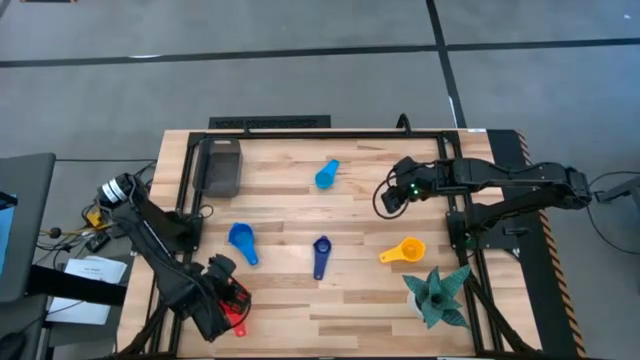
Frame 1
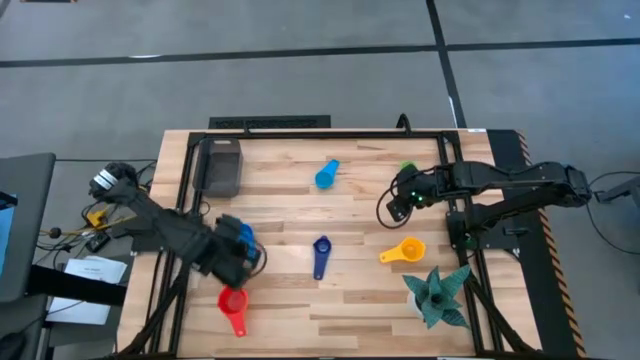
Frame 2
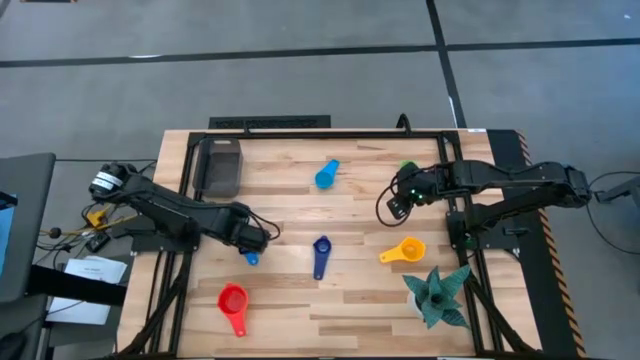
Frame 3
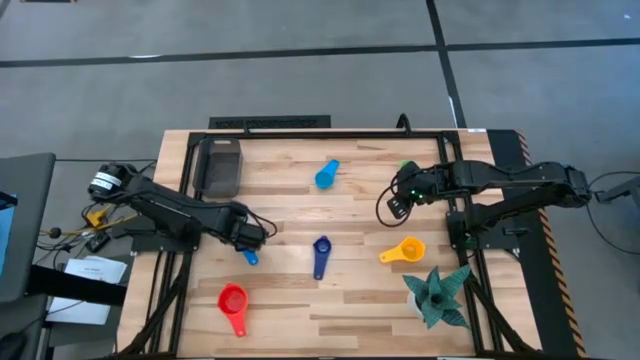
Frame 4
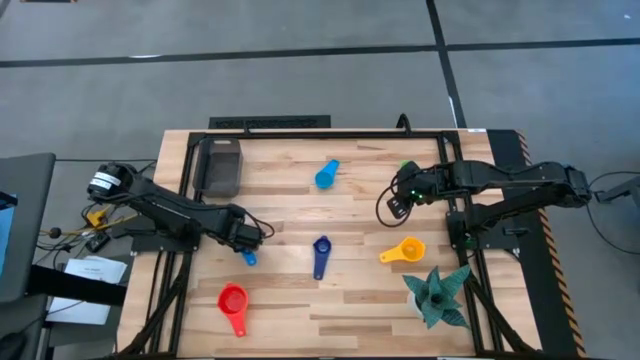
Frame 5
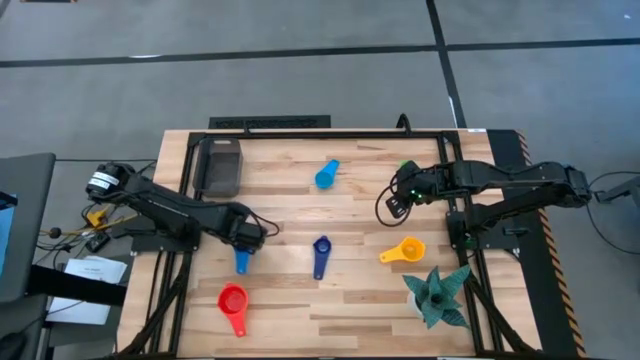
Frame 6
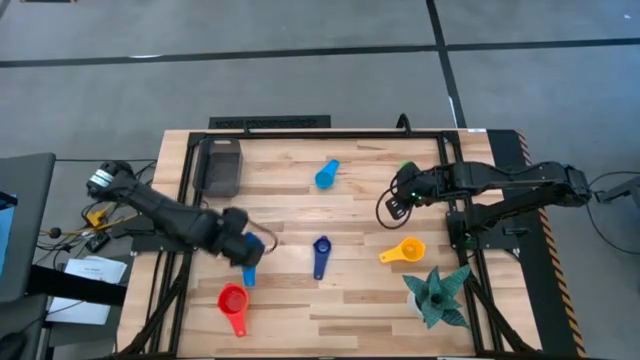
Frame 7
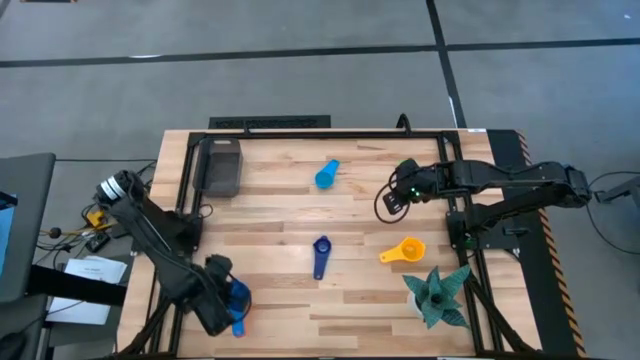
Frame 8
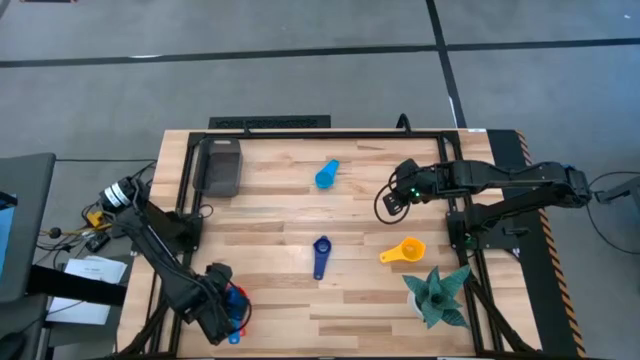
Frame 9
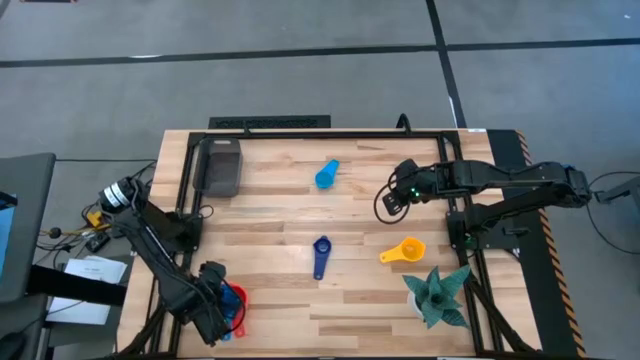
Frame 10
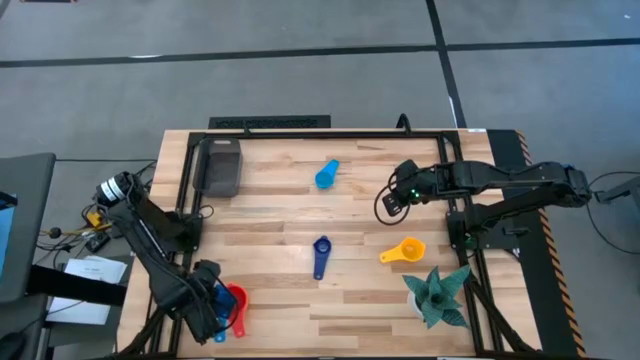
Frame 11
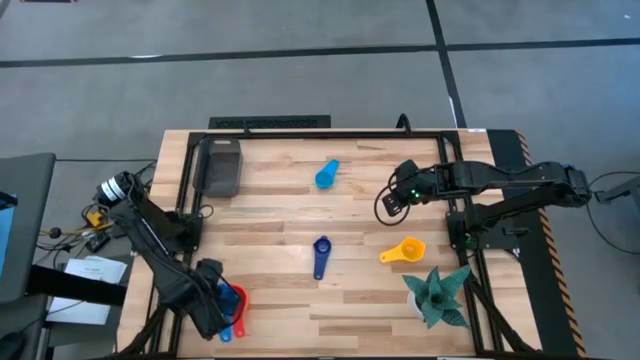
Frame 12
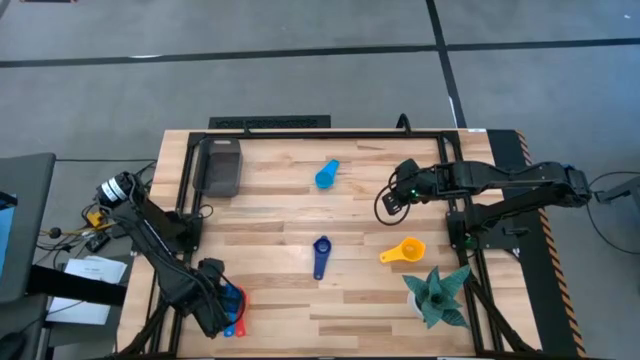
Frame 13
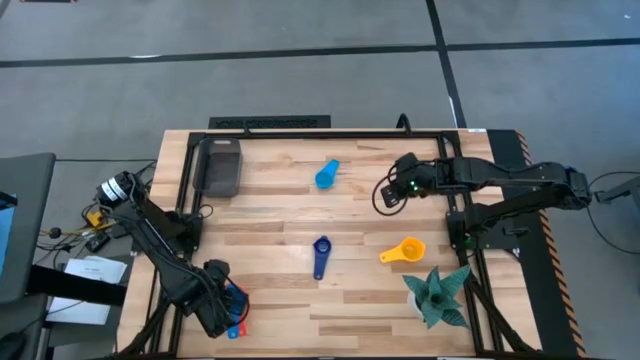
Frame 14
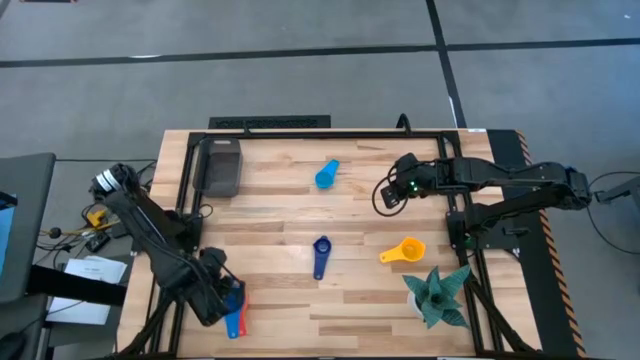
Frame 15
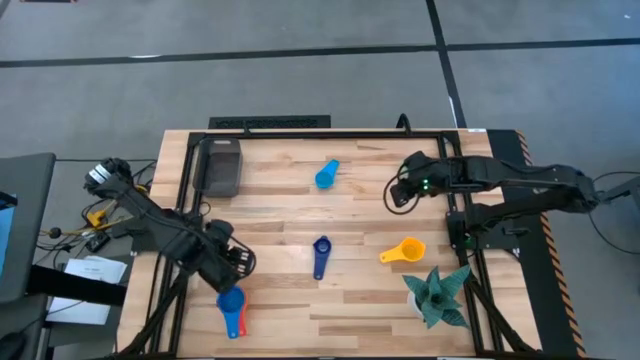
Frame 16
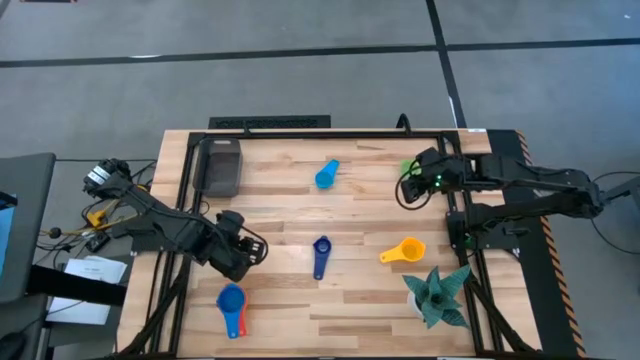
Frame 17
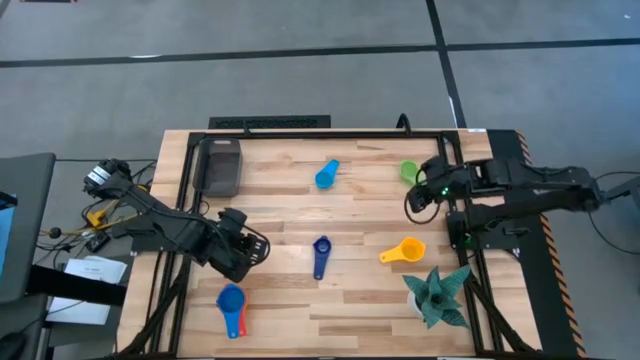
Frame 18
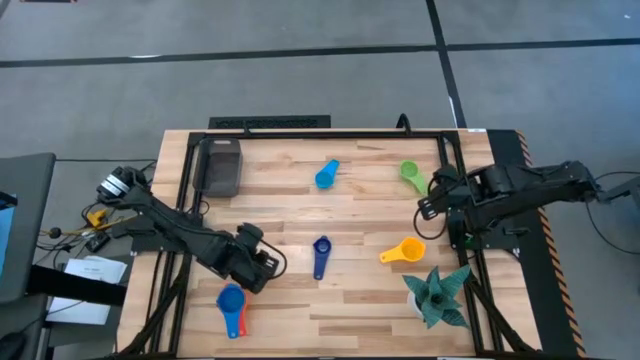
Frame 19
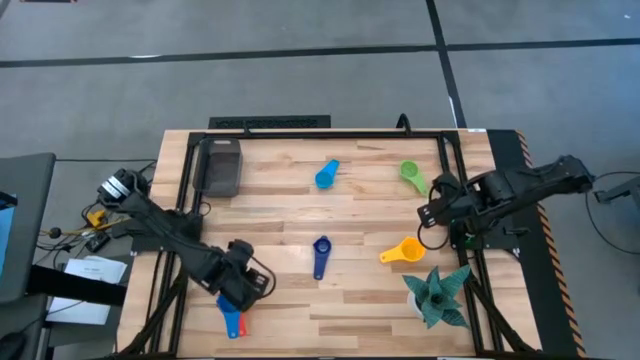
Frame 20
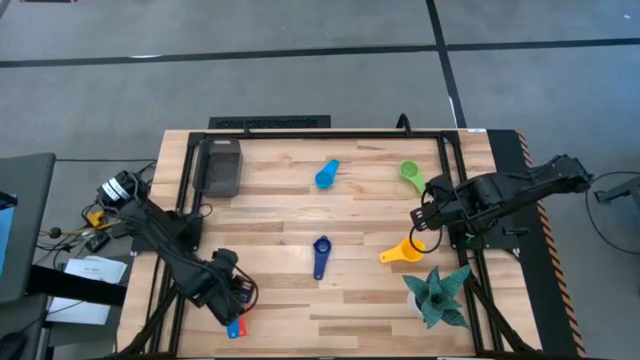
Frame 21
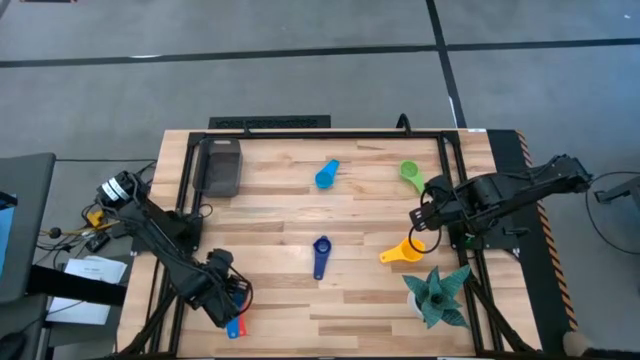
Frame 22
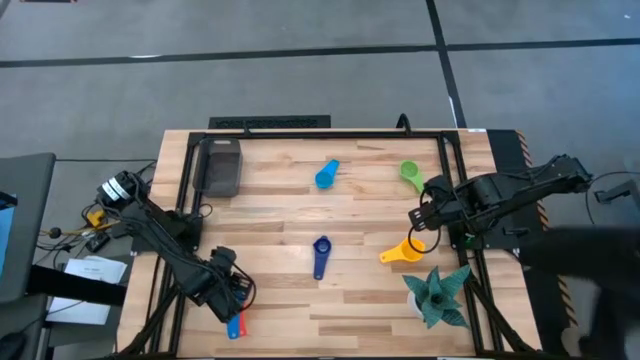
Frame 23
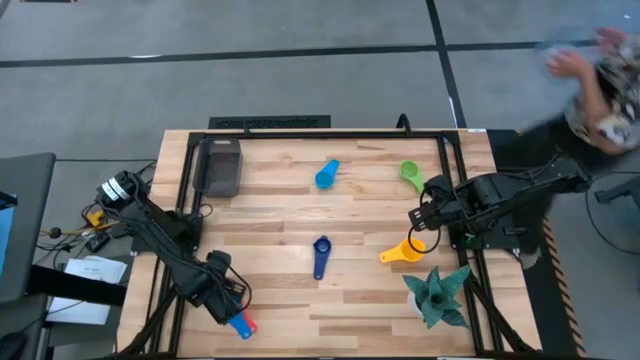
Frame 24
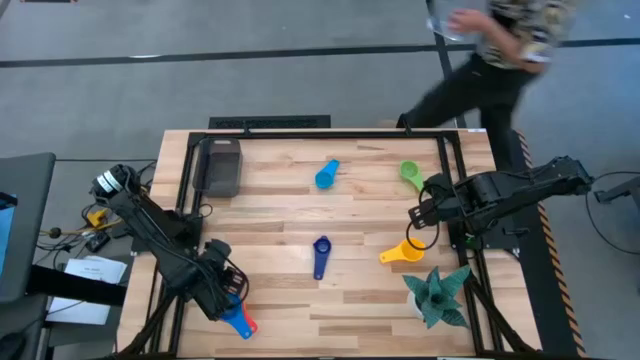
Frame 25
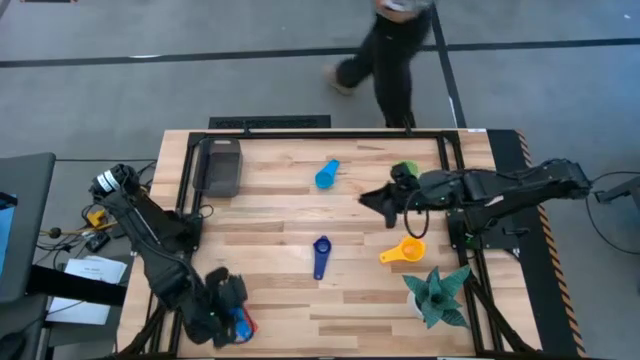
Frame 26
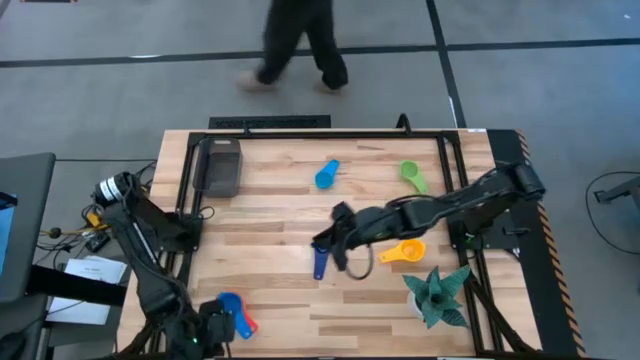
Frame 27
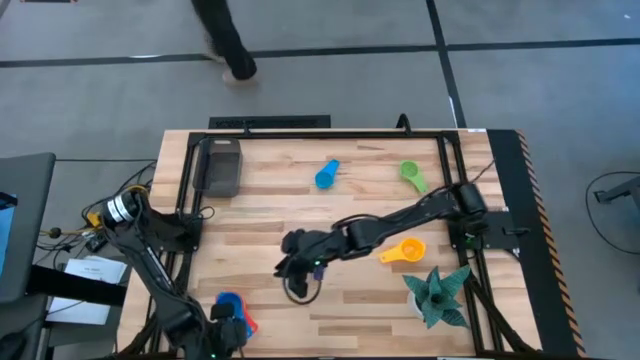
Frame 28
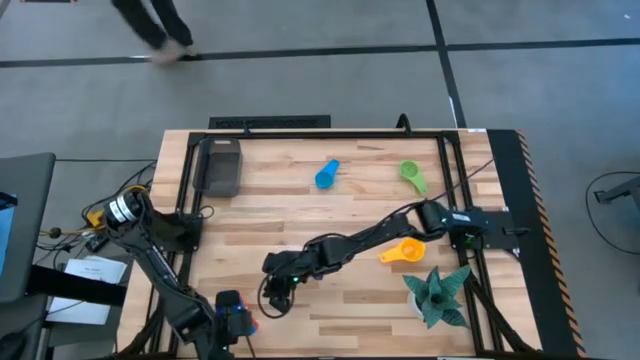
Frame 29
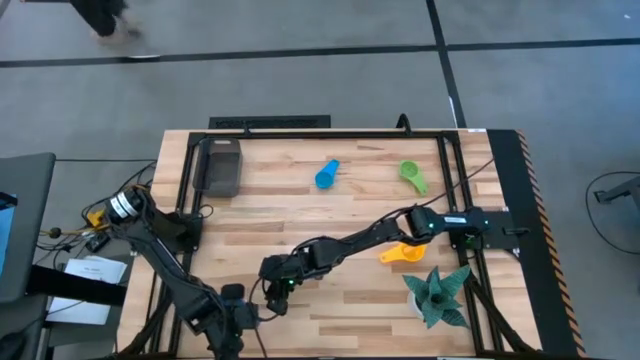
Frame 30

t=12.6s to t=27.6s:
Task: Nest measuring cups in basket
Stack the blue measuring cup on top of the red measuring cup

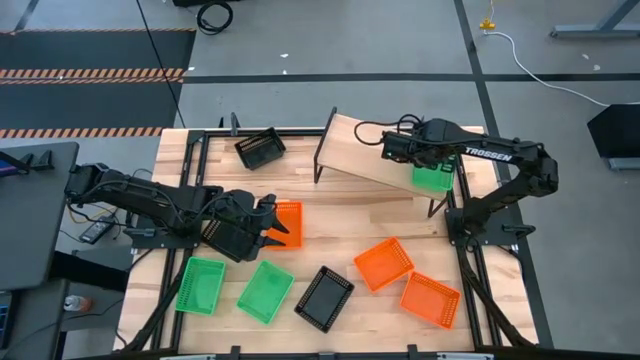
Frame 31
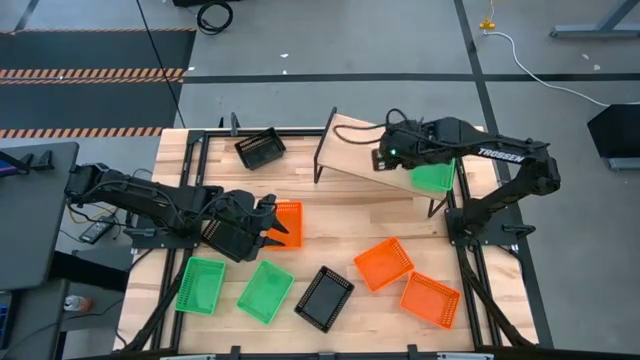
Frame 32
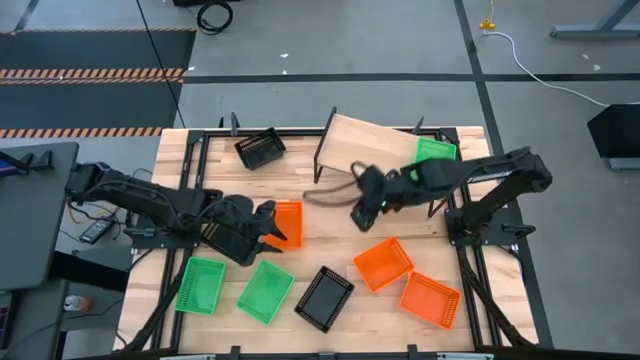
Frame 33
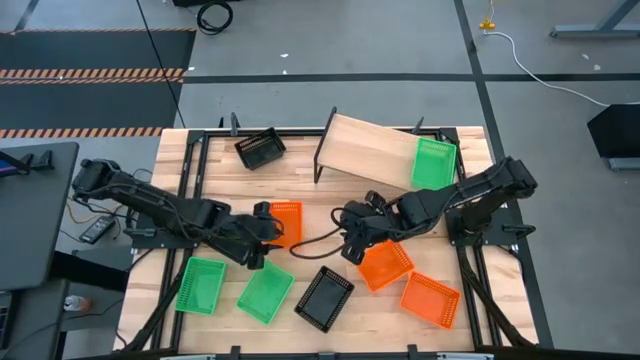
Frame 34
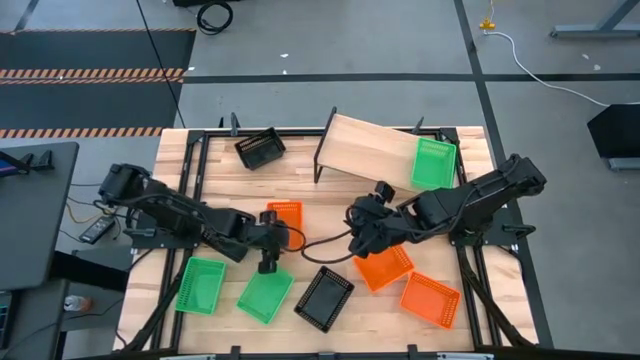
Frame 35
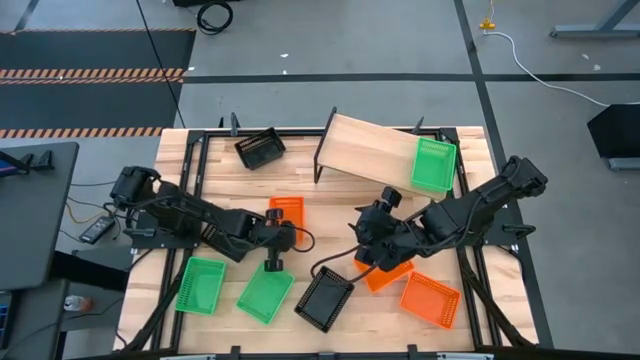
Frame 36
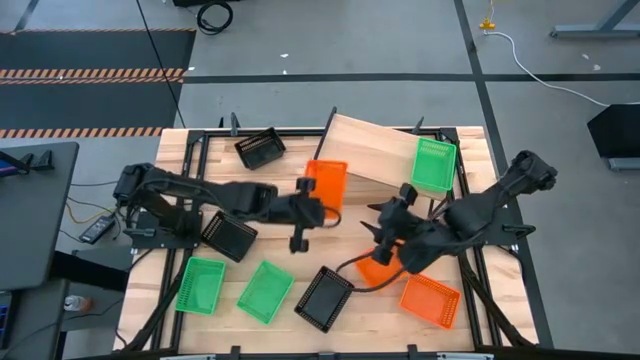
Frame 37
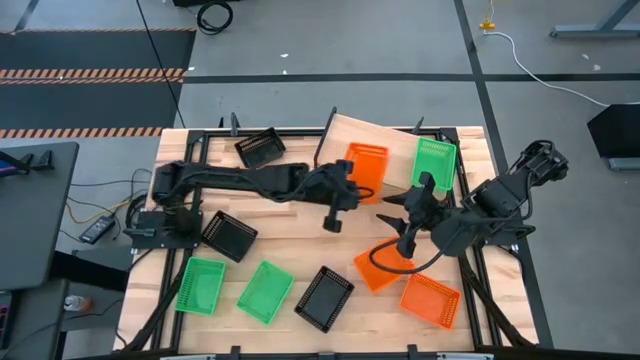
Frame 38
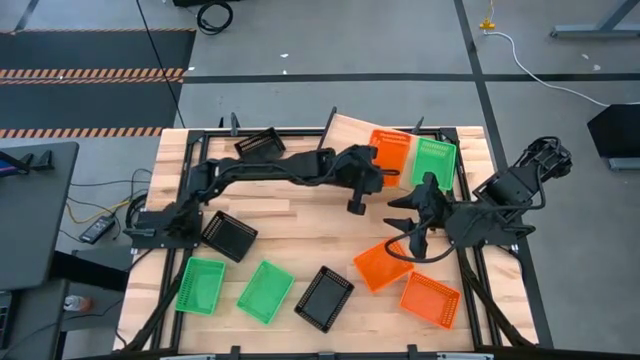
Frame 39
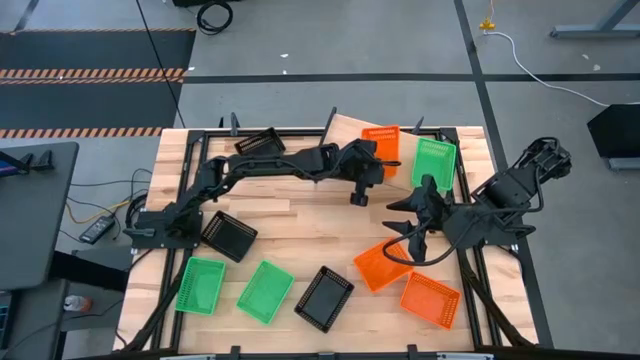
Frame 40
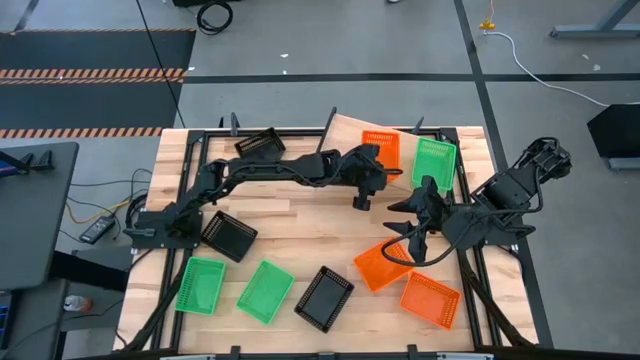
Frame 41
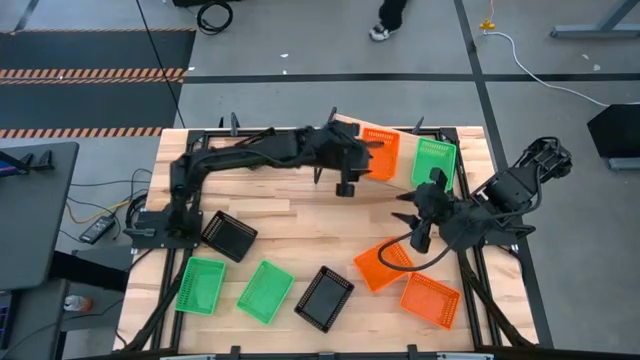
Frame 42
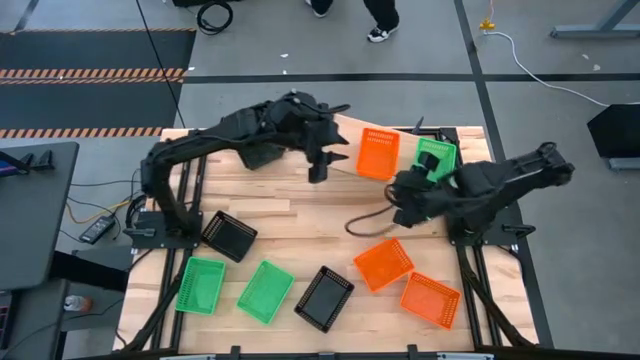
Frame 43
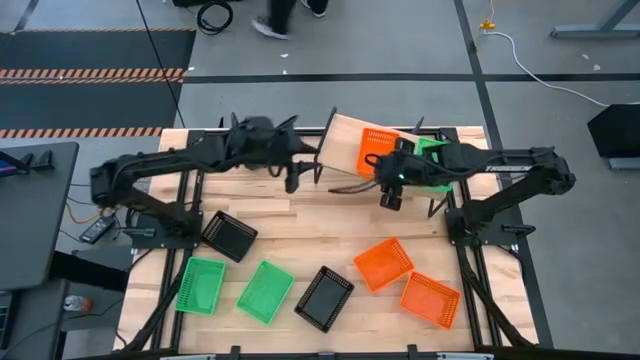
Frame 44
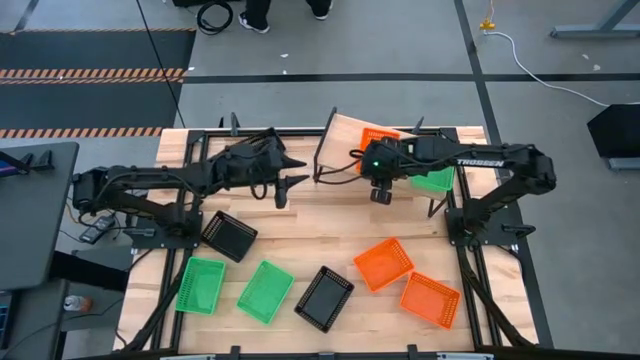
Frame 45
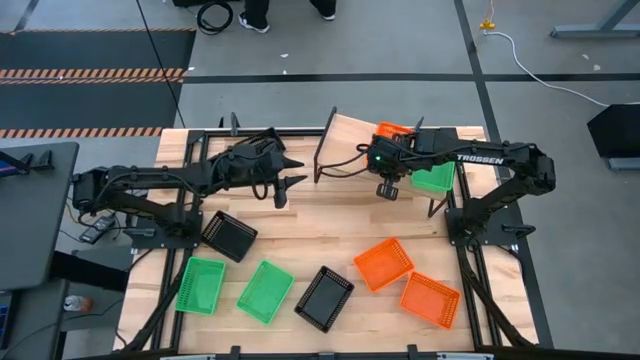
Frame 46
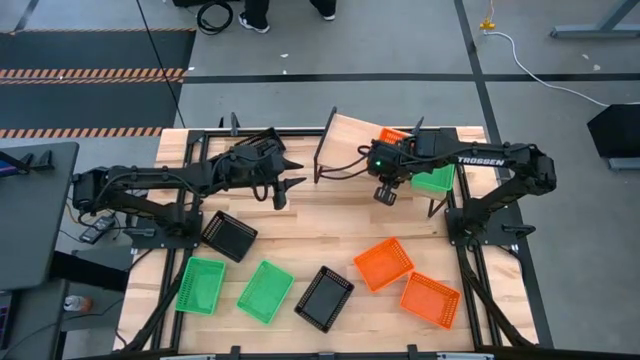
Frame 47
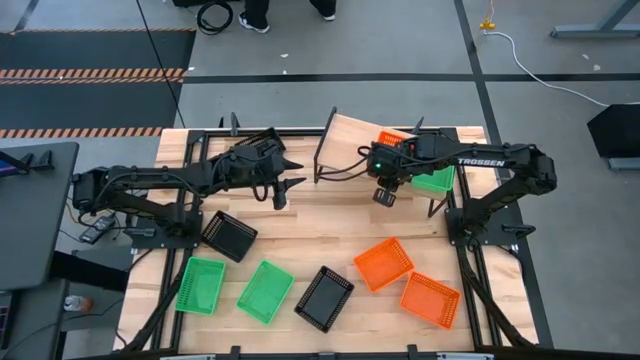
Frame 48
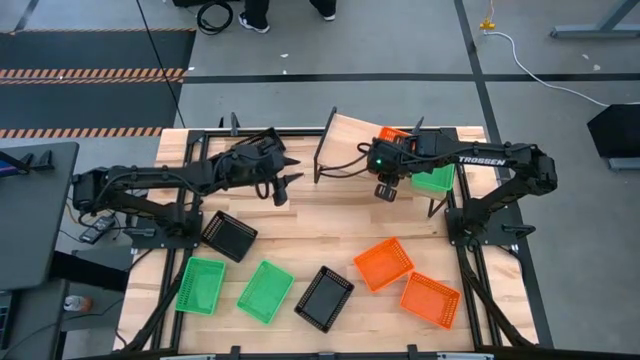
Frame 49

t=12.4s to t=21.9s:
Task: Stack baskets on shelf by color
Put the top orange bin on the shelf
